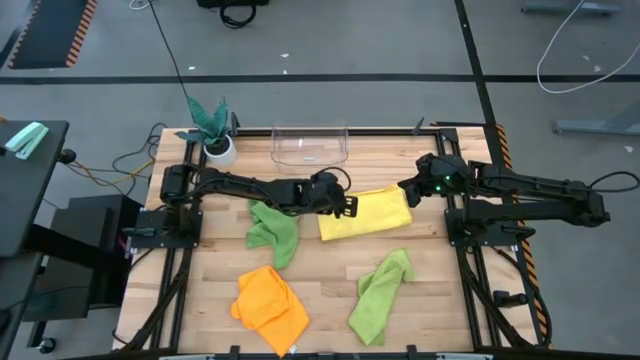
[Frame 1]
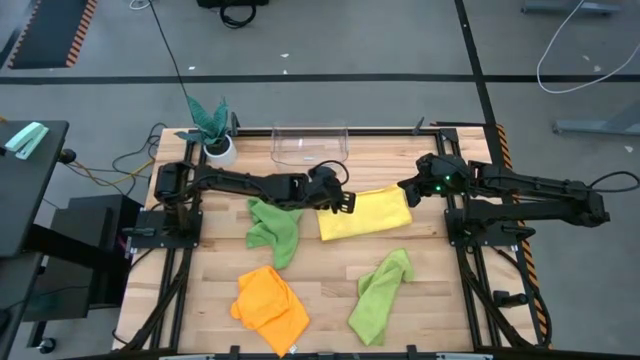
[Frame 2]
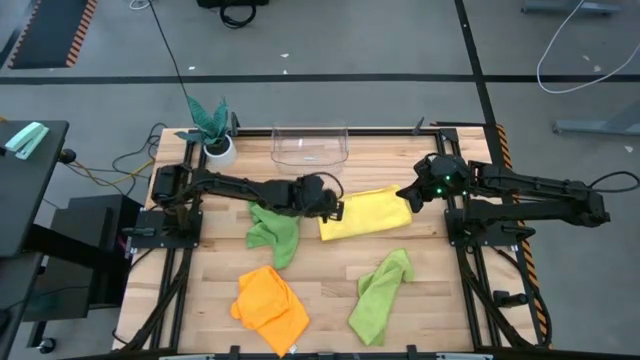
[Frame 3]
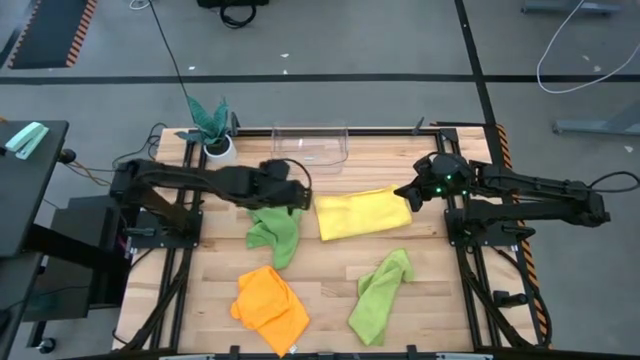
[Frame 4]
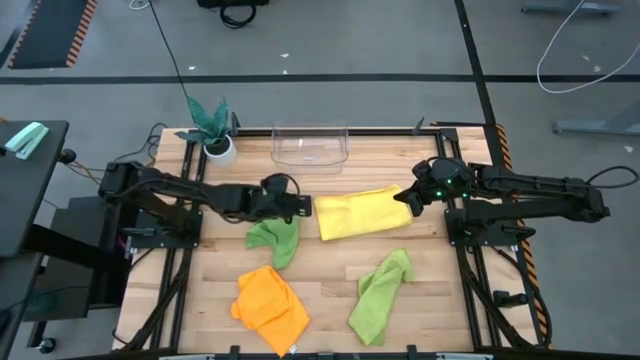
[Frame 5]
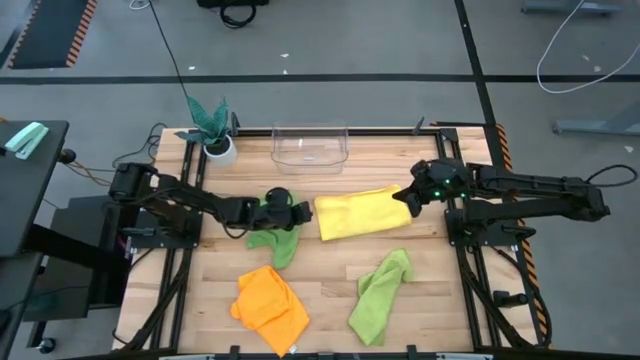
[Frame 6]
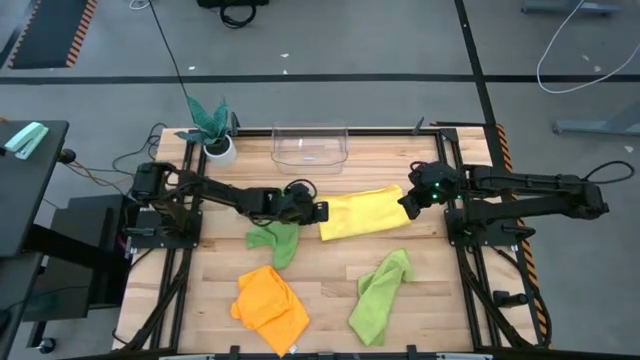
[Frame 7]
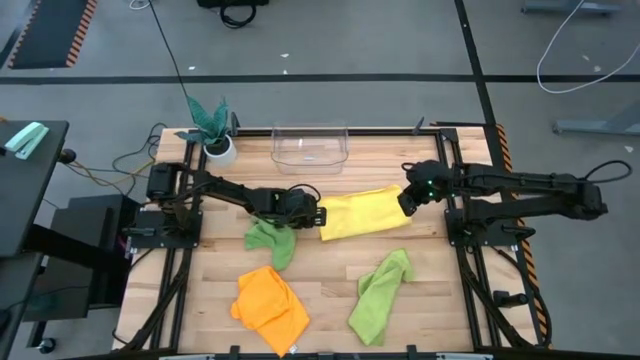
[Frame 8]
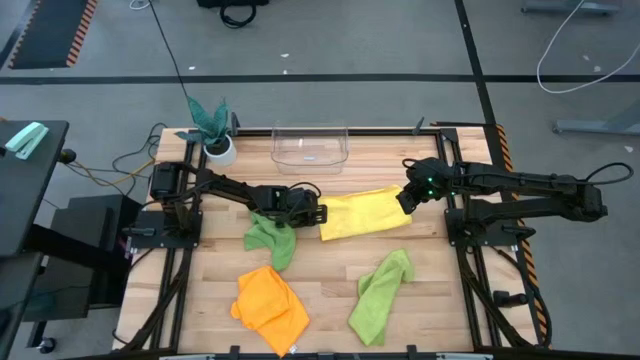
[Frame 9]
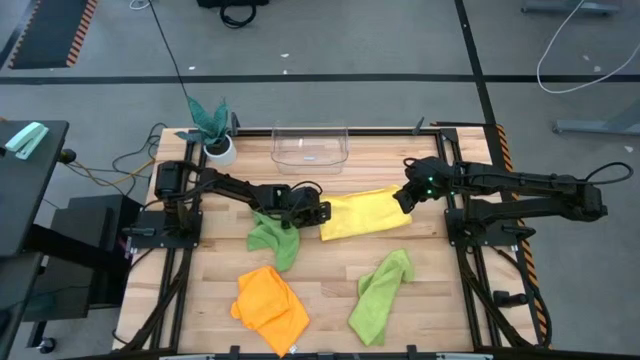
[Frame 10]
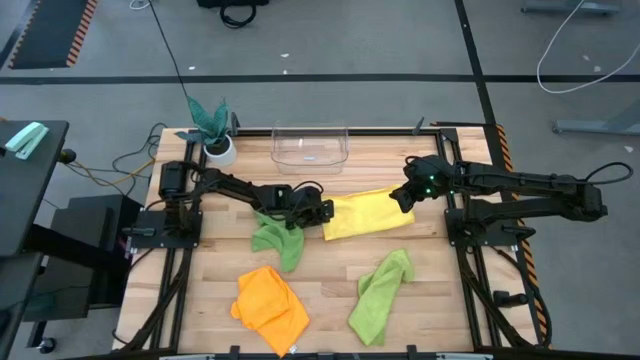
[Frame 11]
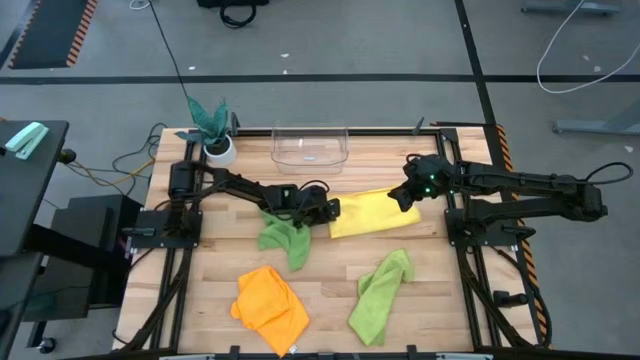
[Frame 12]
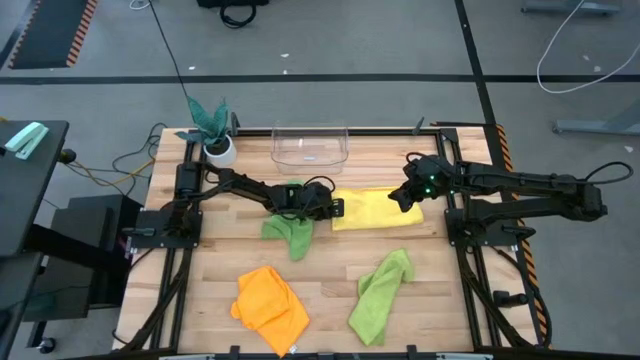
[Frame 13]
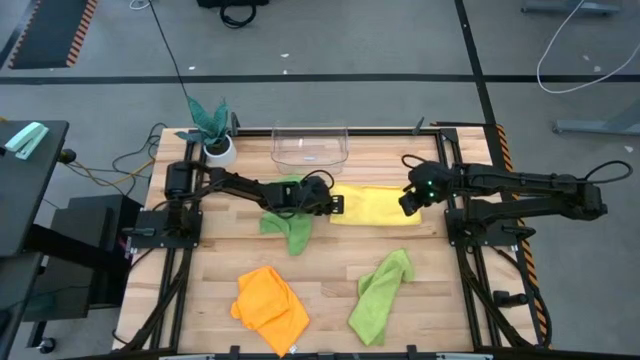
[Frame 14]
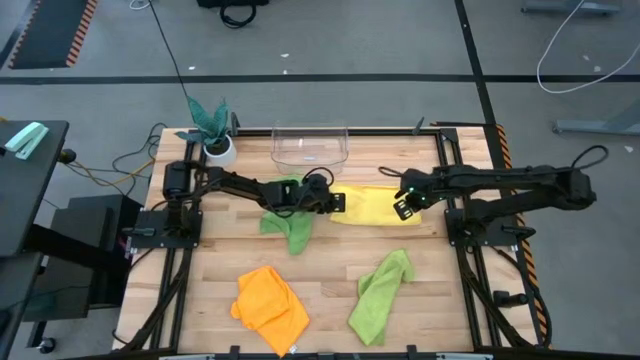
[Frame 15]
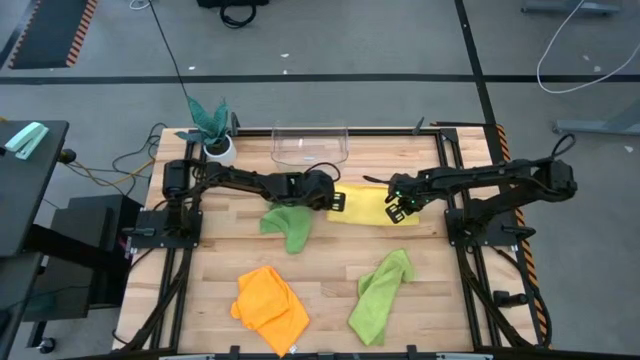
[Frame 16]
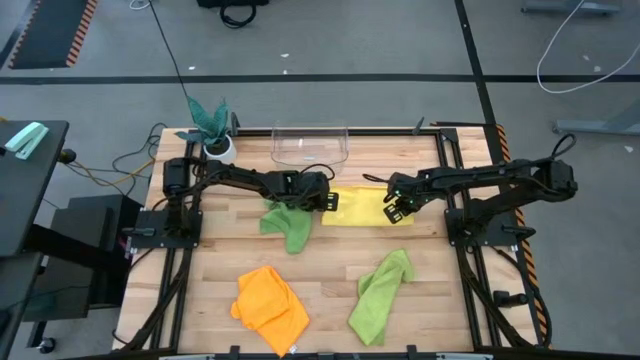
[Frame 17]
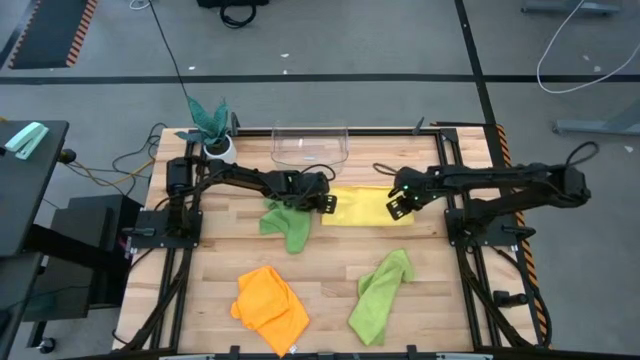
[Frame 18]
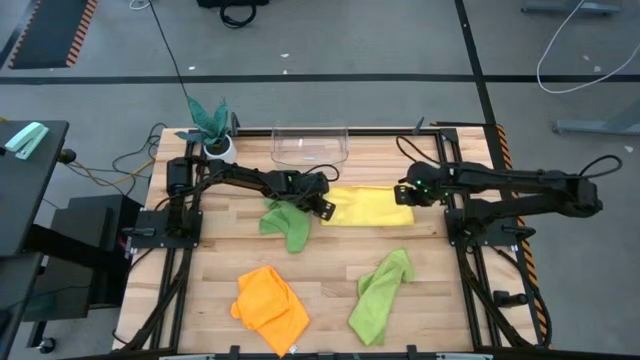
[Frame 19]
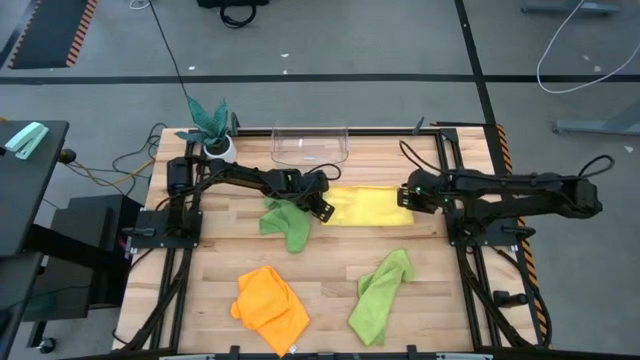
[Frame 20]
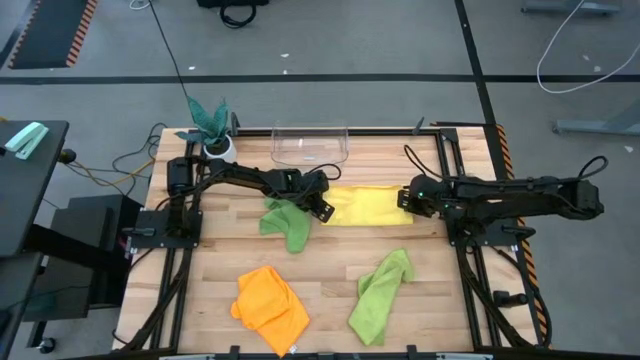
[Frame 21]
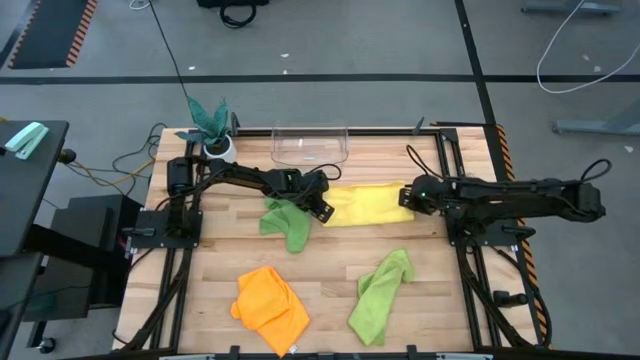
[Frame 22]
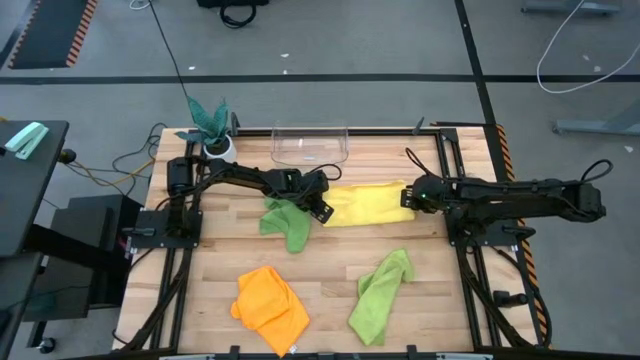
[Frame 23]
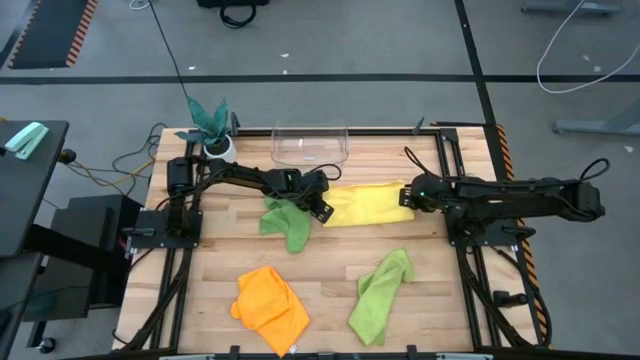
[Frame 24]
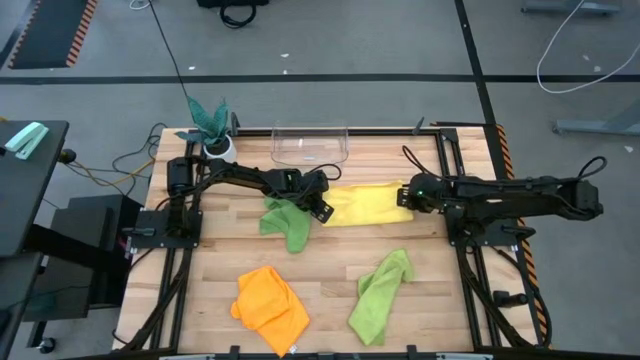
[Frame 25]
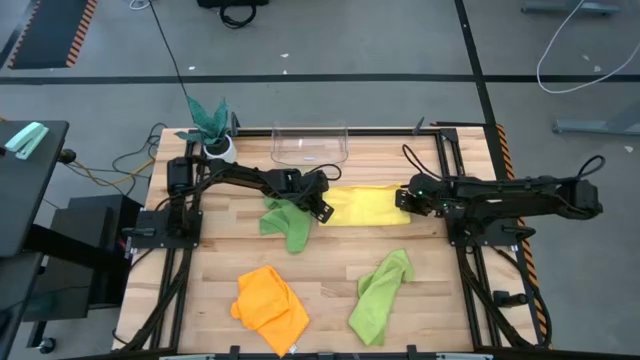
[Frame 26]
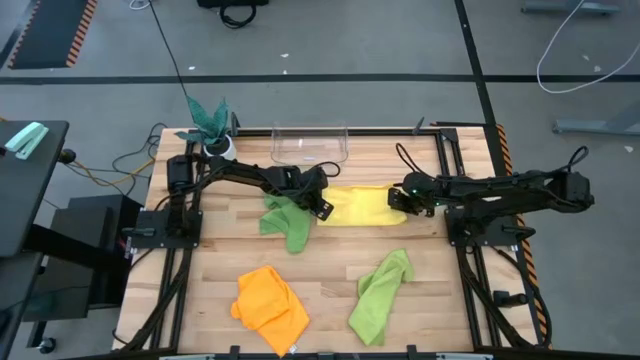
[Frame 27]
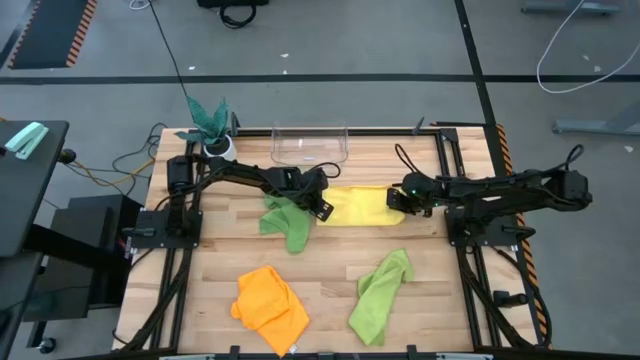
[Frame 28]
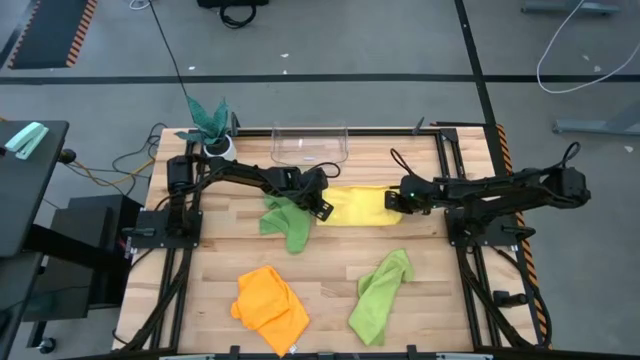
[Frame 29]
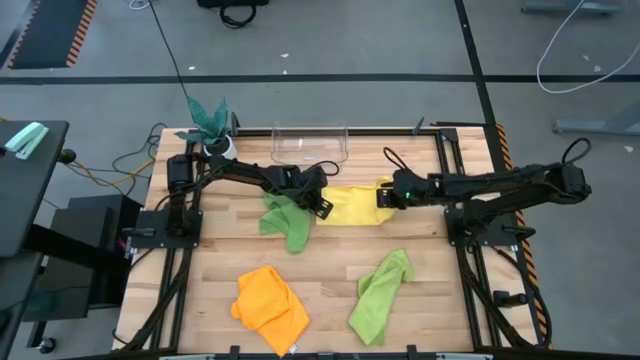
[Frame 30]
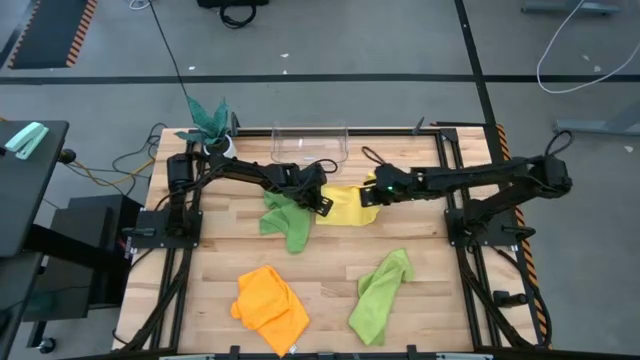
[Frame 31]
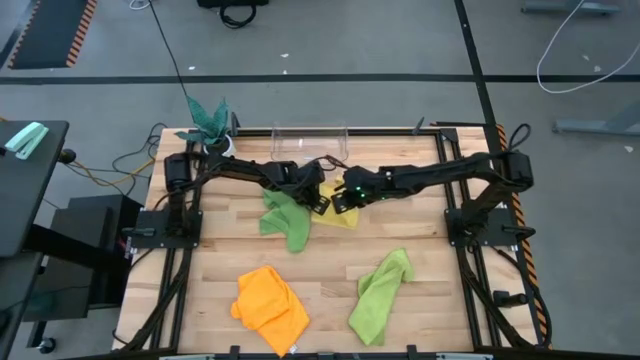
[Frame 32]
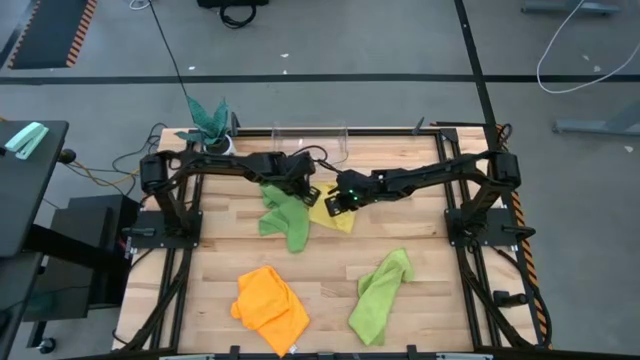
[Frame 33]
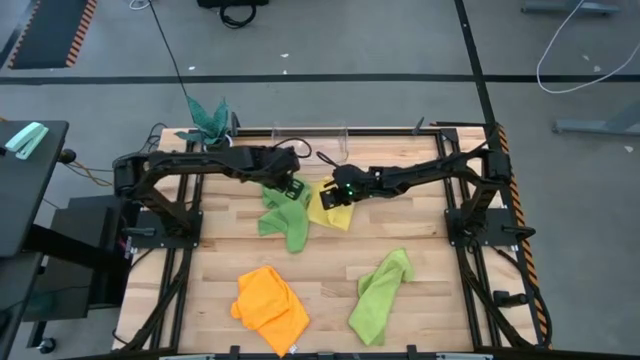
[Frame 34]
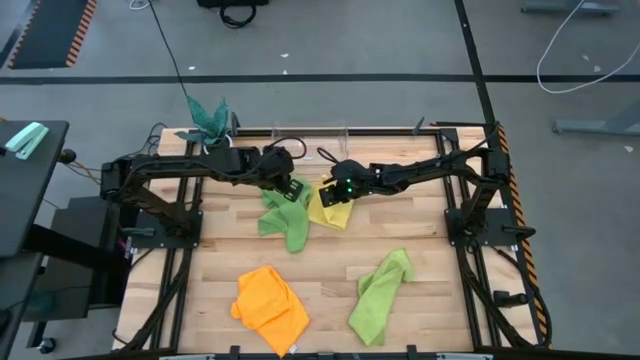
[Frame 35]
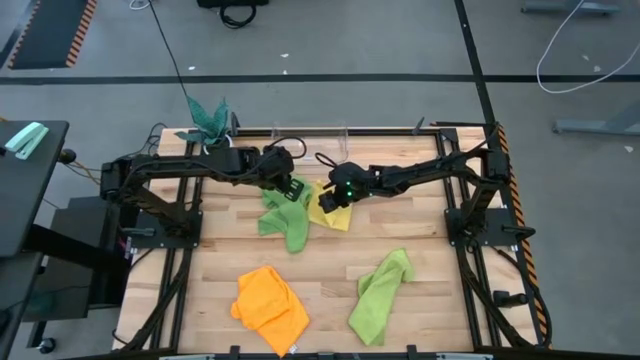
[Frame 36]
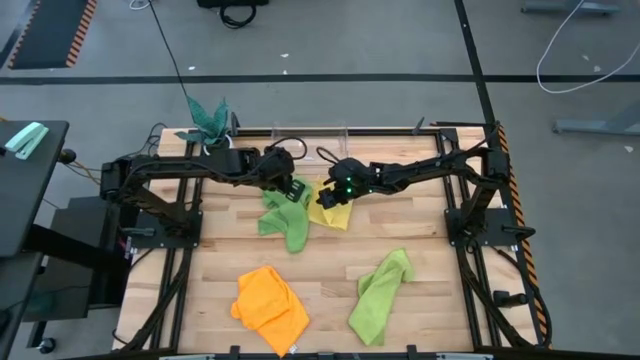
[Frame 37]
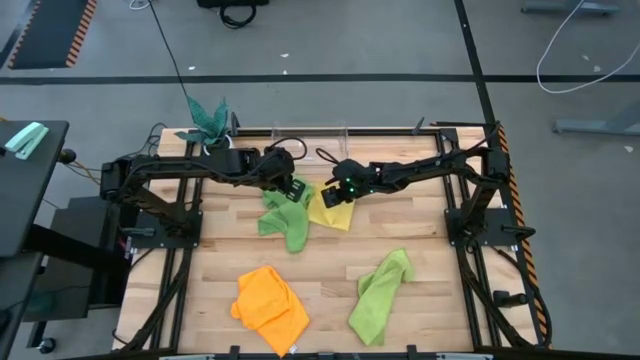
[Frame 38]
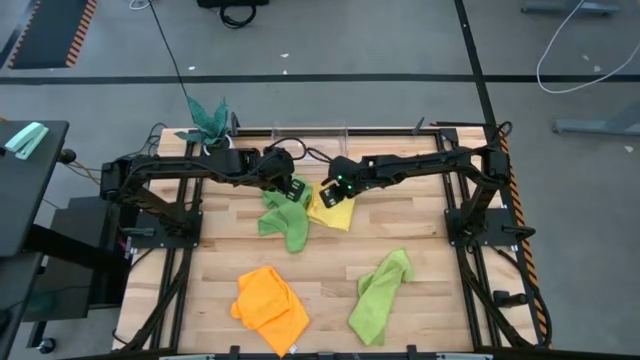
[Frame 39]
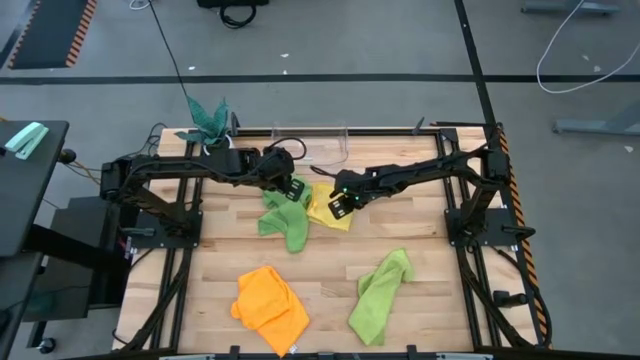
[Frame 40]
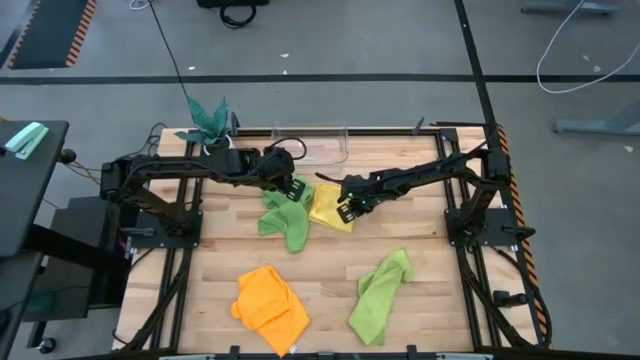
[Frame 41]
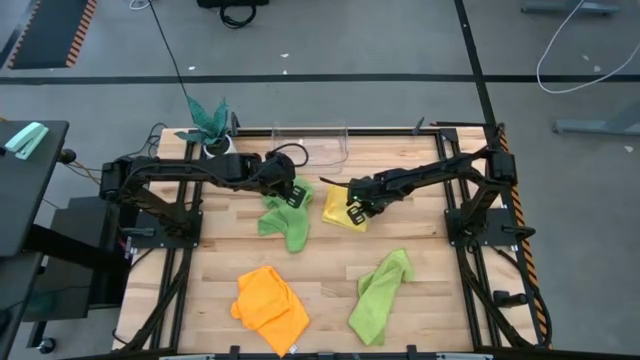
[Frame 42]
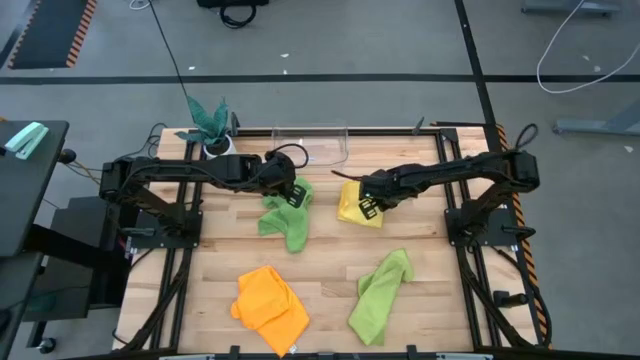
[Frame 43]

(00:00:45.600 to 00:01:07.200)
Task: Fold microfiber towels
Fold the yellow towel

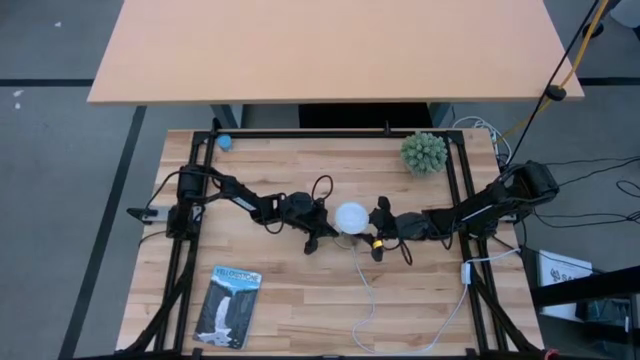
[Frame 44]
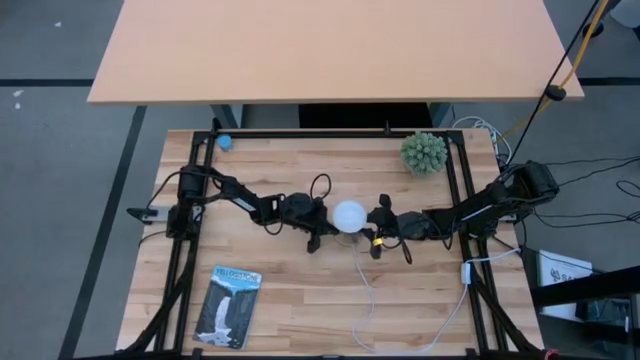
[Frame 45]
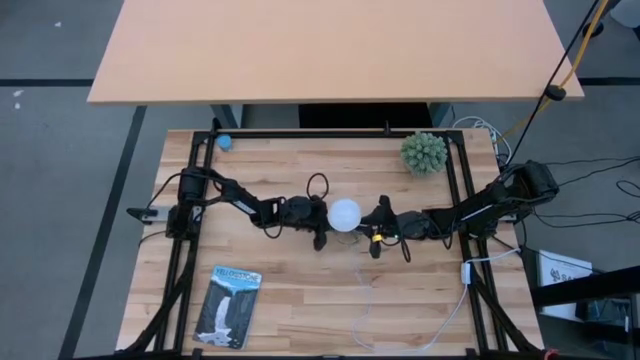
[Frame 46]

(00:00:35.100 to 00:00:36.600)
Task: Screw lightbulb
Insert the lightbulb into the lamp
